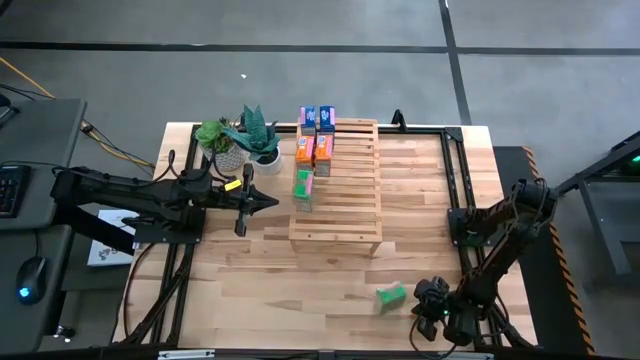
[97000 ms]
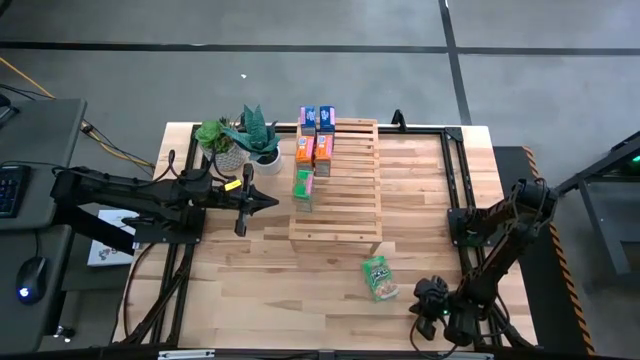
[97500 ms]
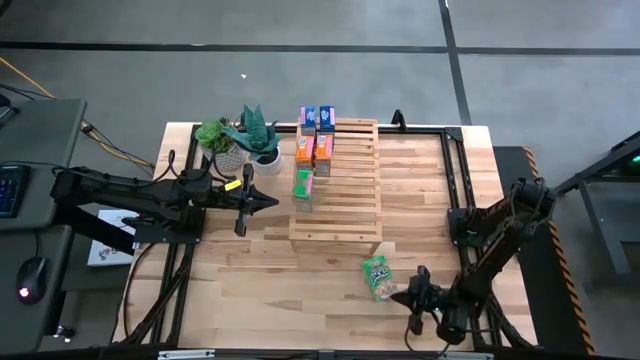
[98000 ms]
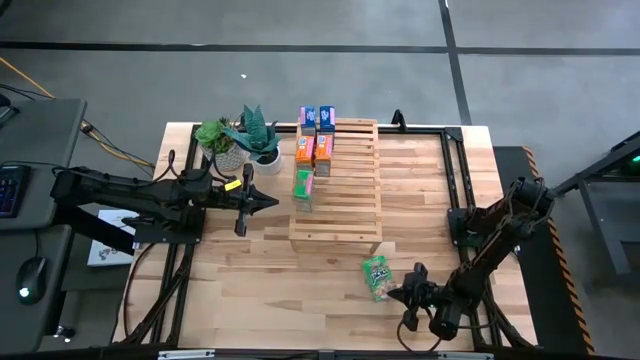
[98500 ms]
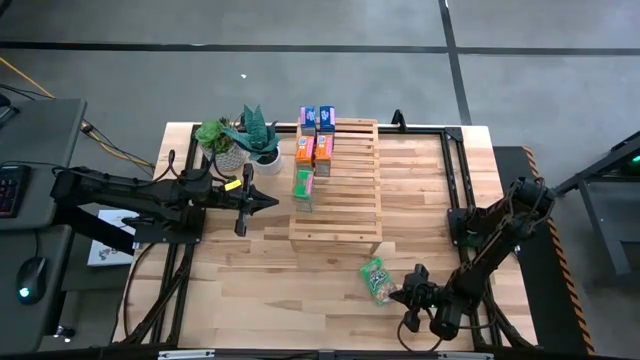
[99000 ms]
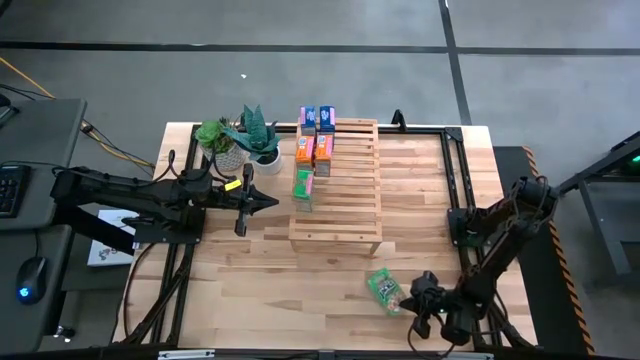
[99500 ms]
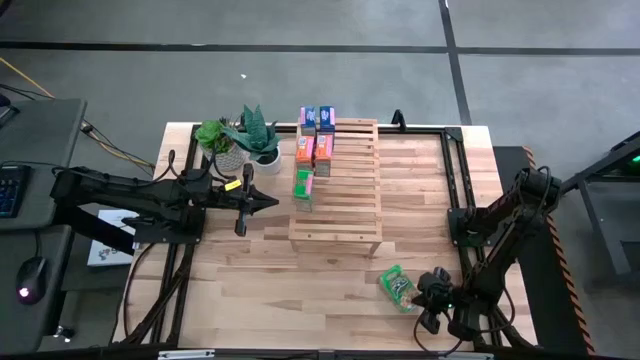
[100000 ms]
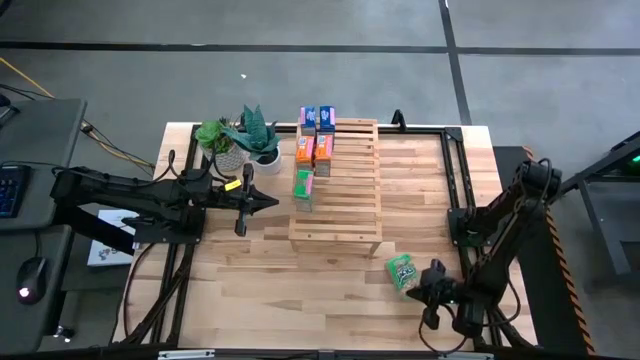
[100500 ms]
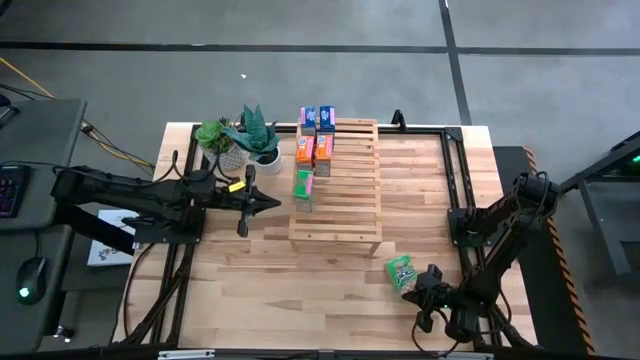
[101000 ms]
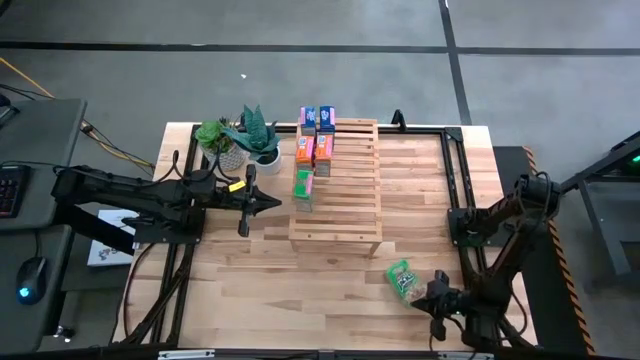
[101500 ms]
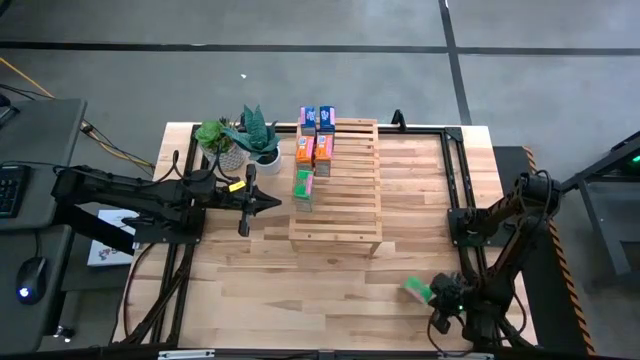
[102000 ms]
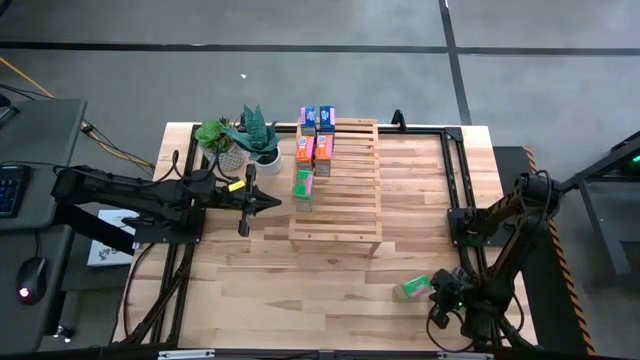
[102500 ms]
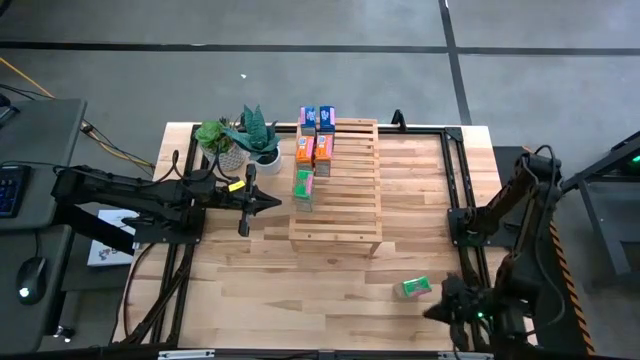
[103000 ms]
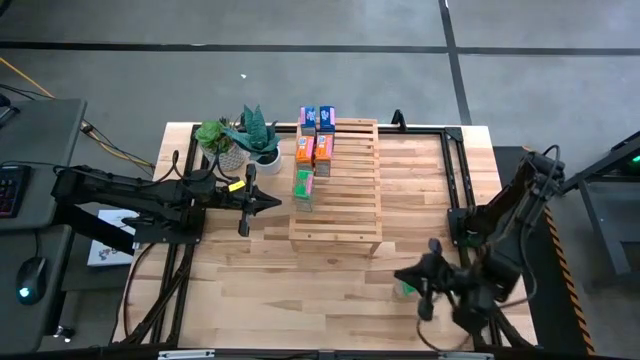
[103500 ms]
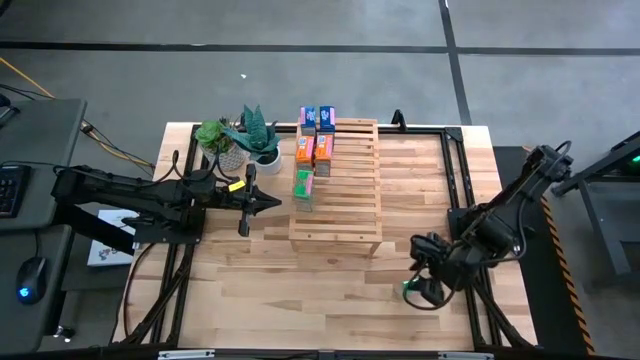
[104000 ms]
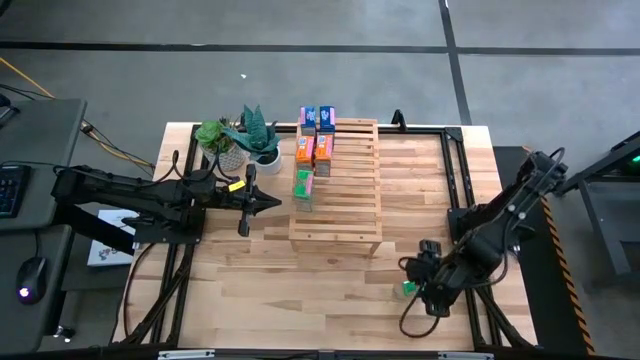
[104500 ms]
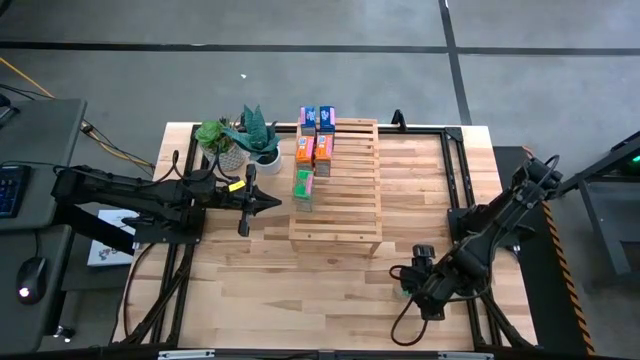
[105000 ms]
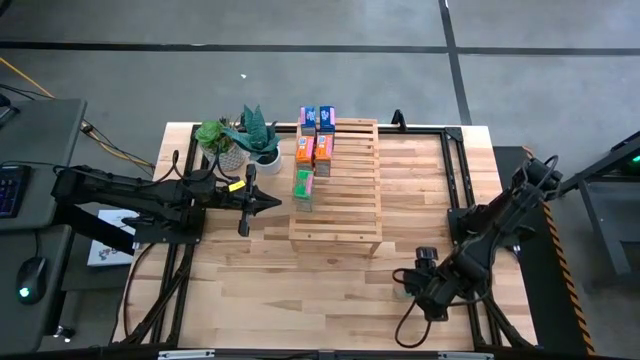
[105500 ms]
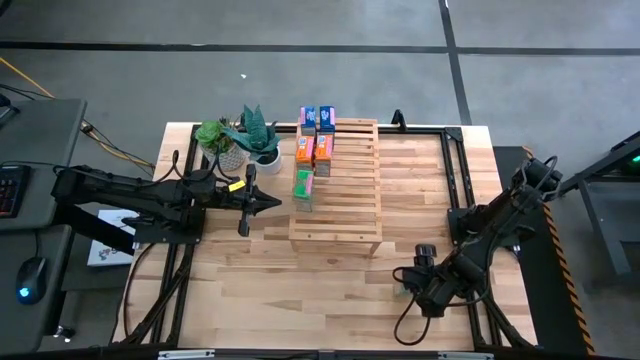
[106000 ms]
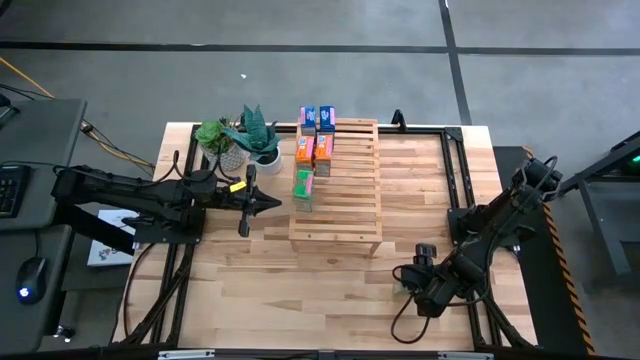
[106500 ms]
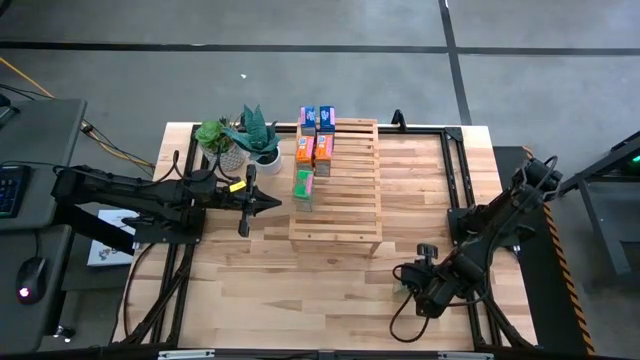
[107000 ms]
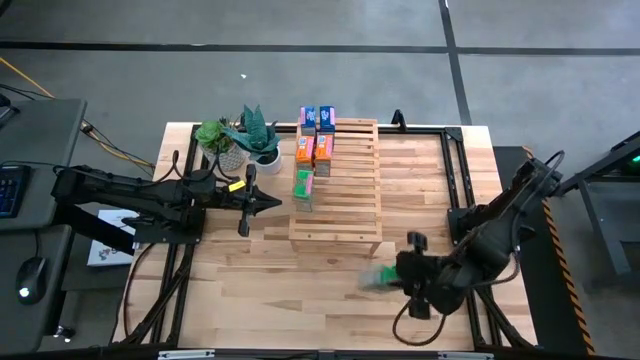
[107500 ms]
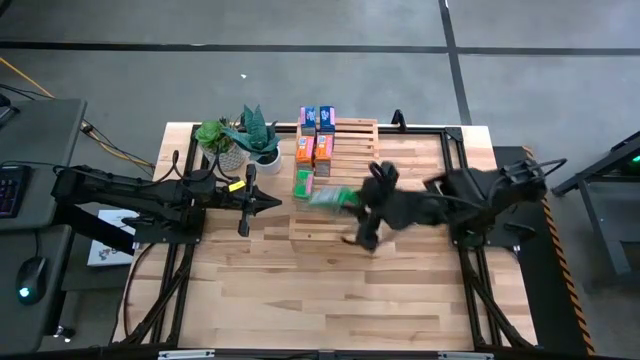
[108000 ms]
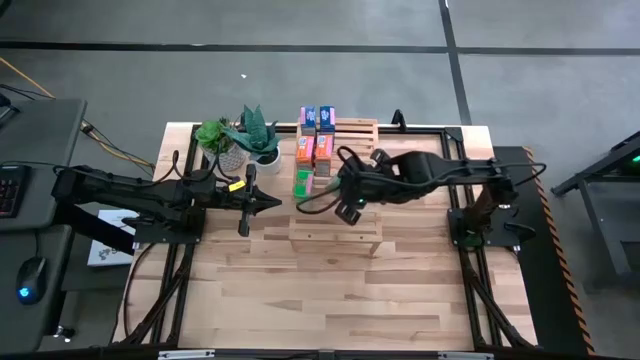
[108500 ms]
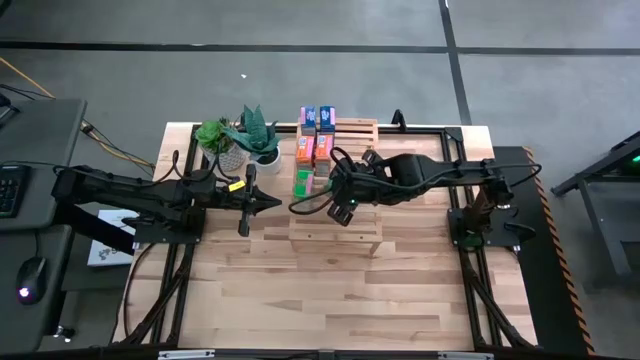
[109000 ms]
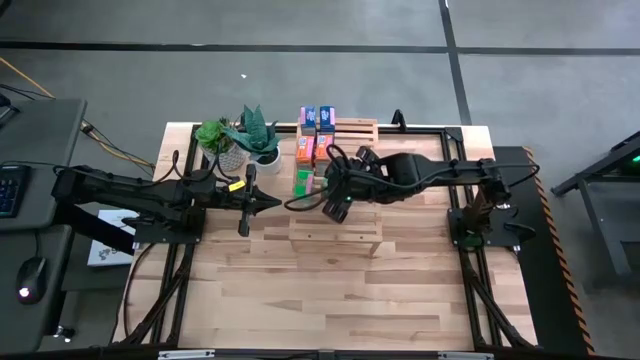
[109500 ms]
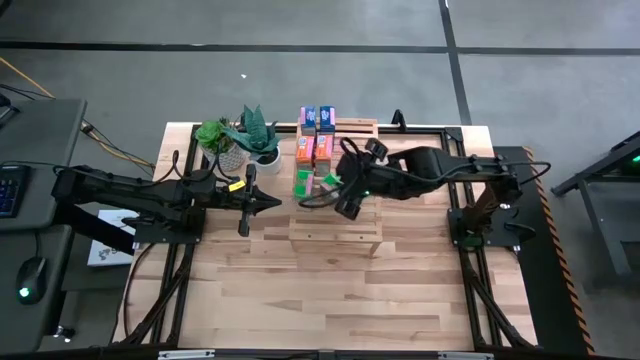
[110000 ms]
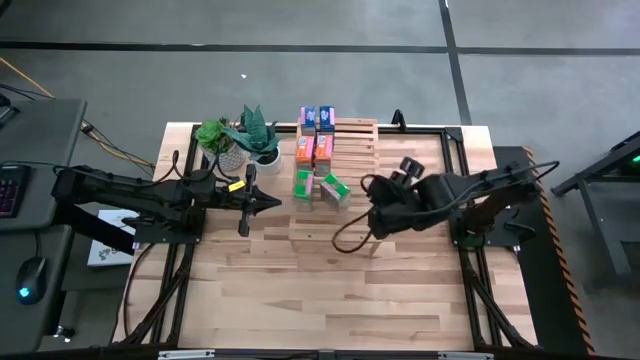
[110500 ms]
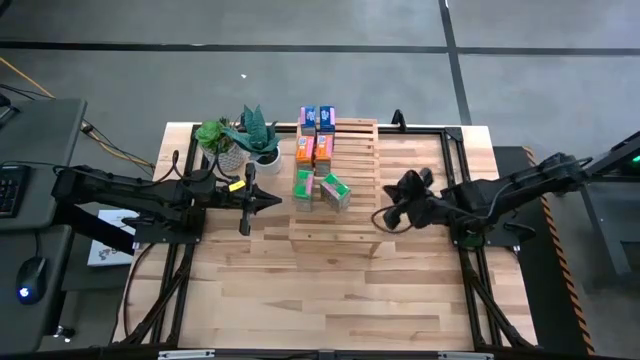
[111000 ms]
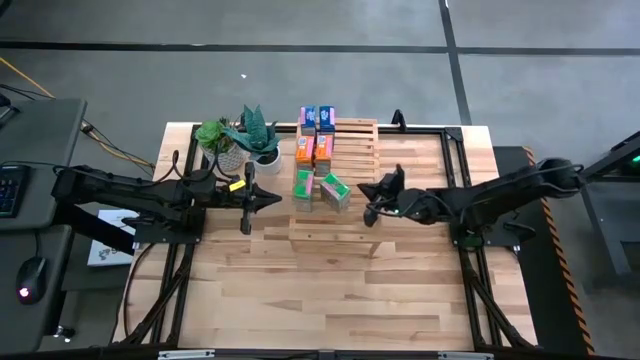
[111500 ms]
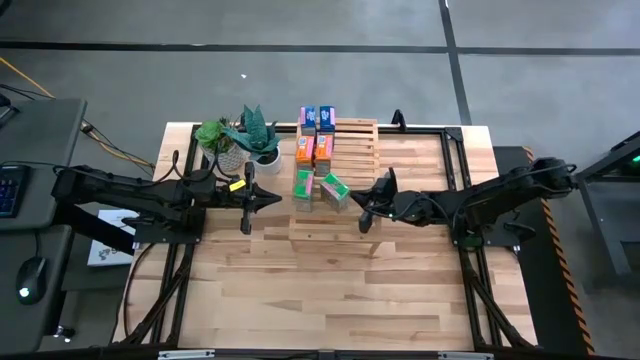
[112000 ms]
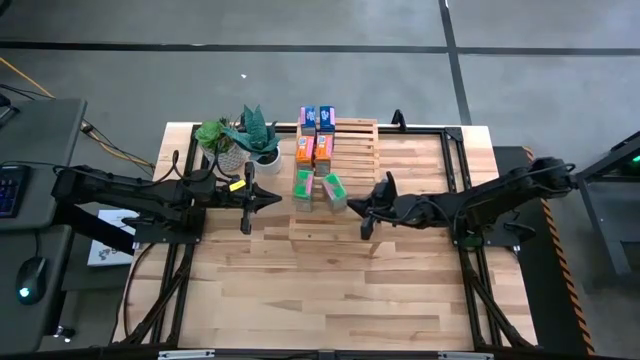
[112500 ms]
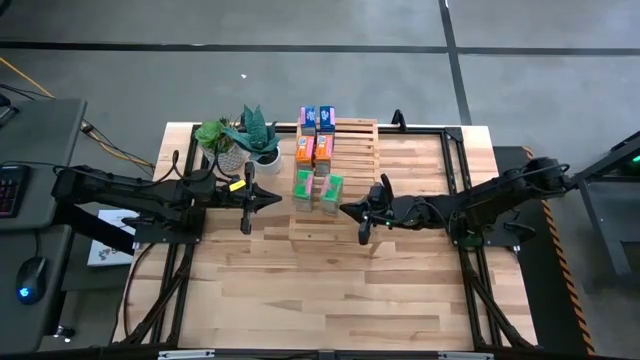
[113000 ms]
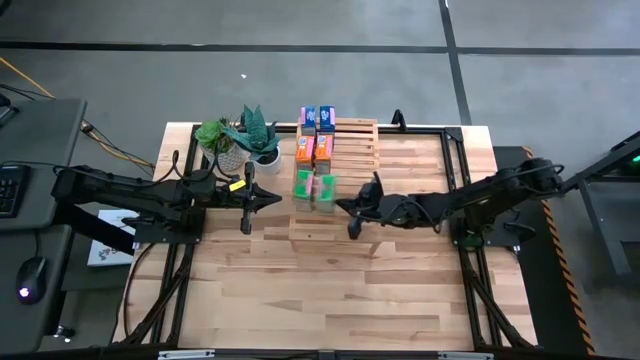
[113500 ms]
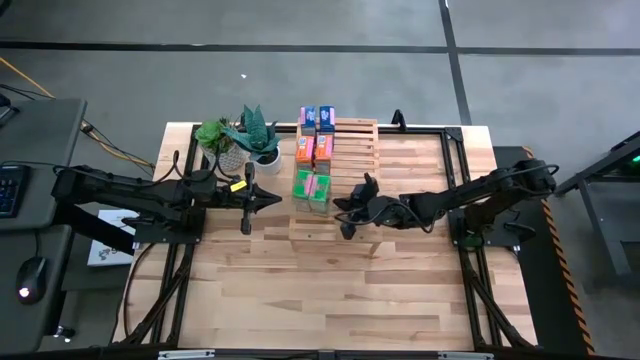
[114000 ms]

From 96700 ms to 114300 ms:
Task: Stack cereal on shelf
Put the green cereal box on the shelf aligned with the other green cereal box

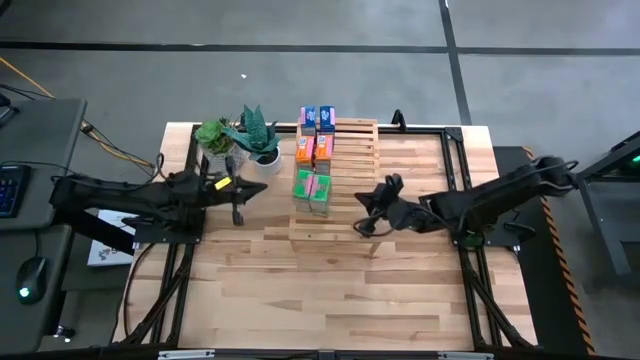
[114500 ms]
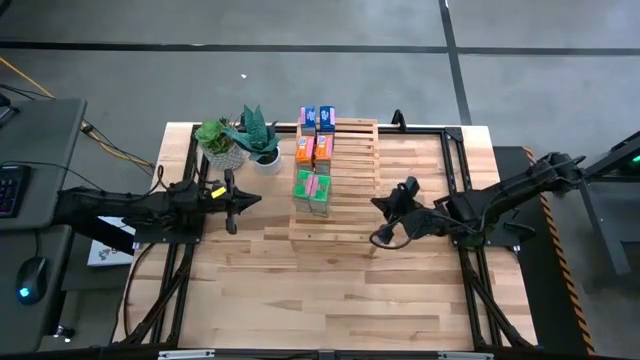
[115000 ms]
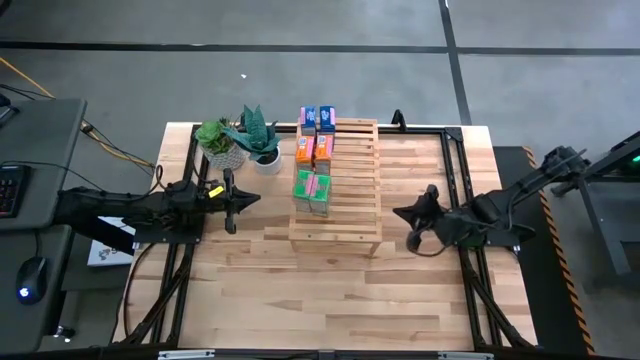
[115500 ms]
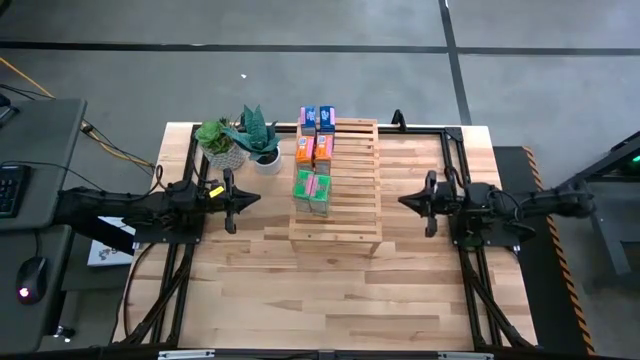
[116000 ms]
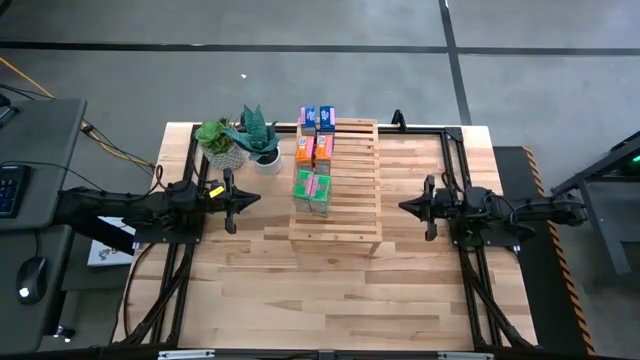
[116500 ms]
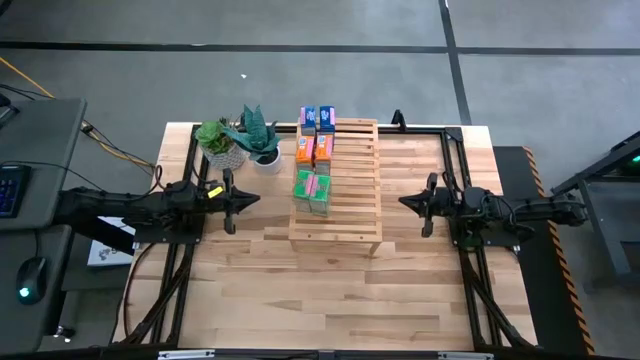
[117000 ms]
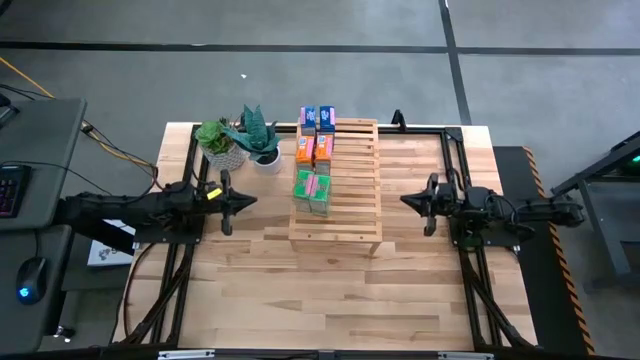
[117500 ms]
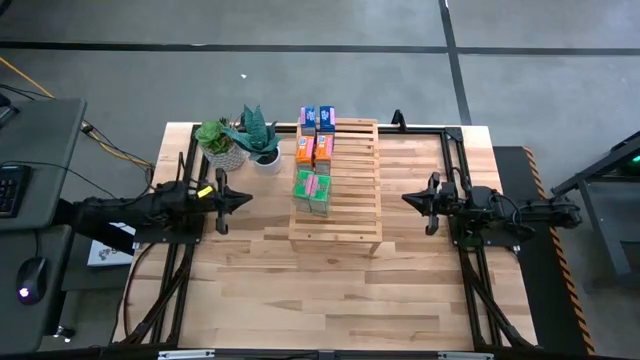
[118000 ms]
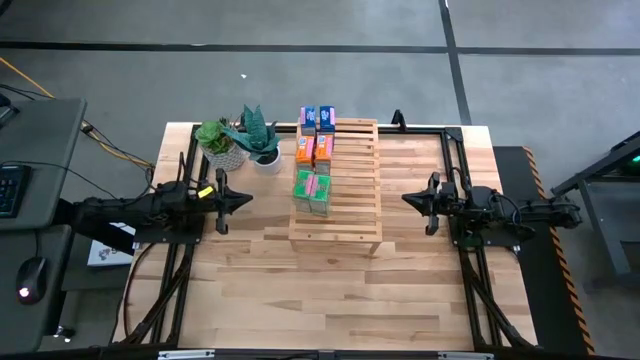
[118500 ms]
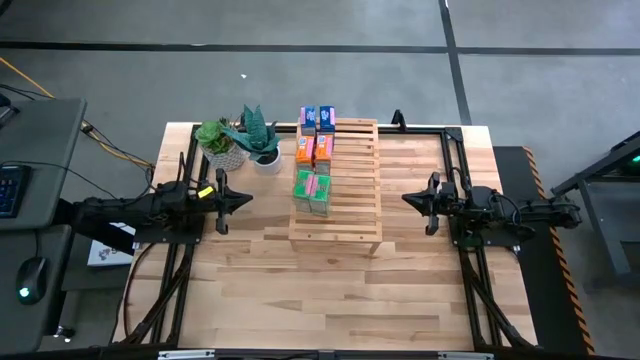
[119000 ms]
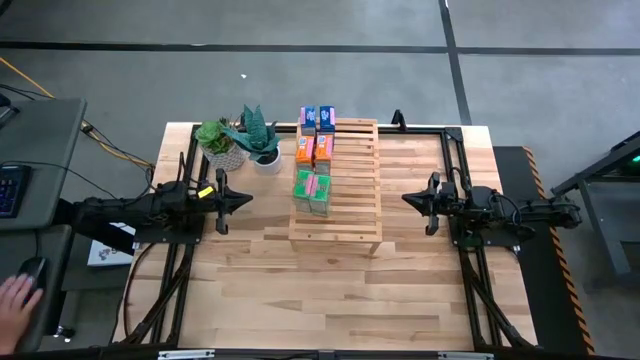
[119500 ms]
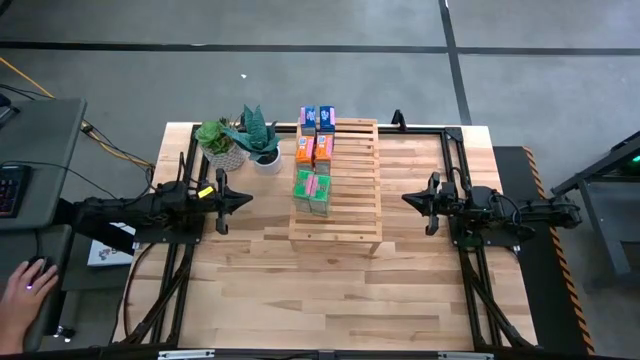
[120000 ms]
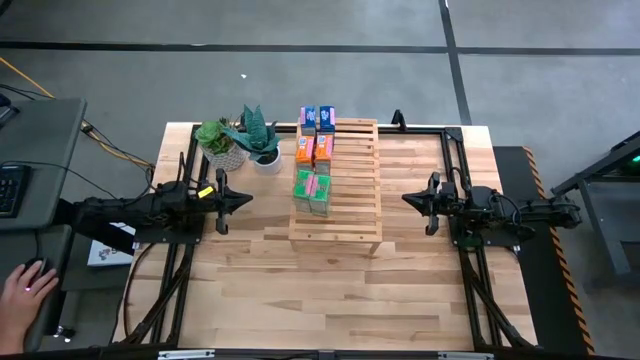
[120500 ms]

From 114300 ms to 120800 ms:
Return to home position
